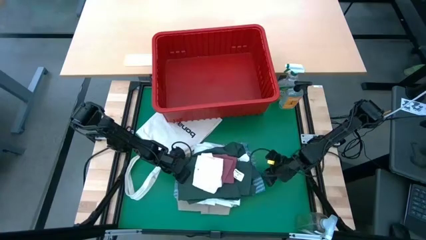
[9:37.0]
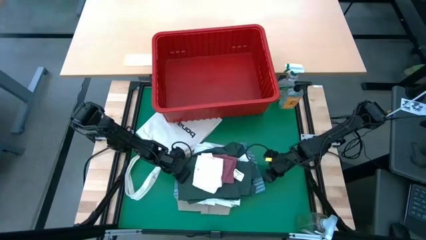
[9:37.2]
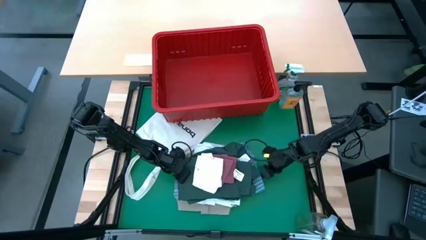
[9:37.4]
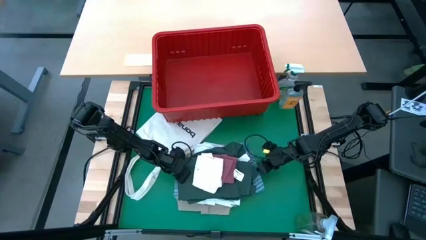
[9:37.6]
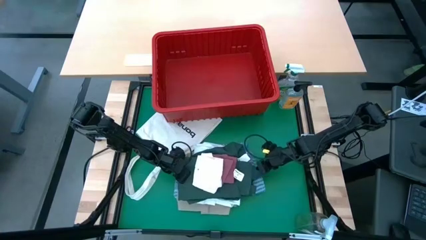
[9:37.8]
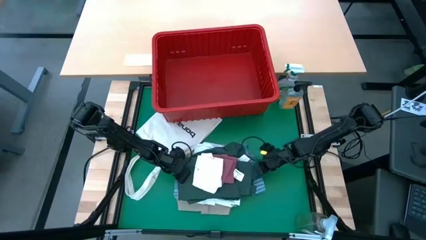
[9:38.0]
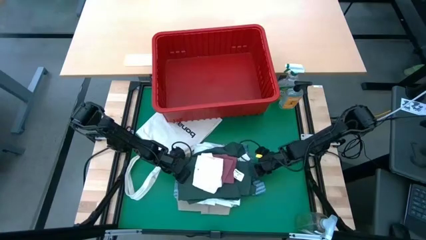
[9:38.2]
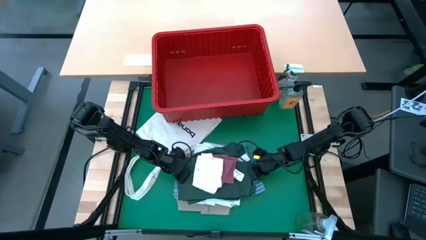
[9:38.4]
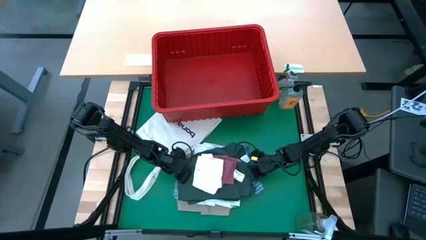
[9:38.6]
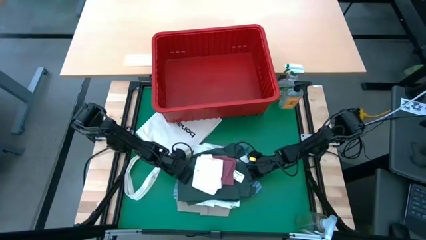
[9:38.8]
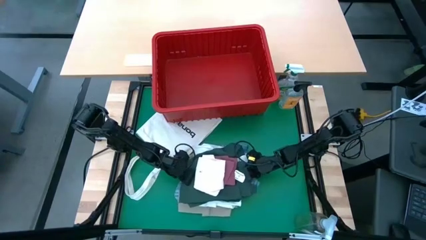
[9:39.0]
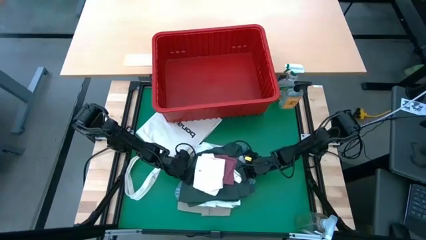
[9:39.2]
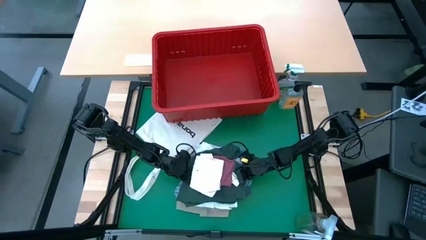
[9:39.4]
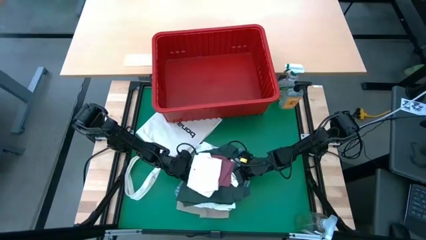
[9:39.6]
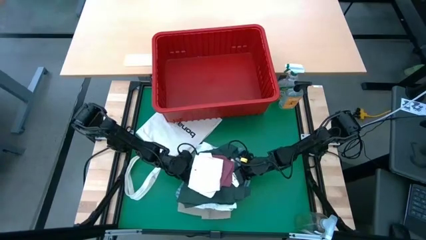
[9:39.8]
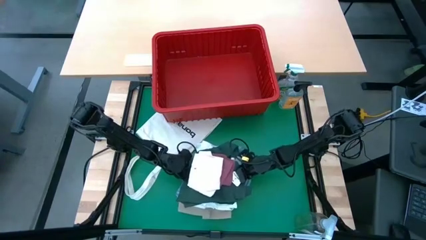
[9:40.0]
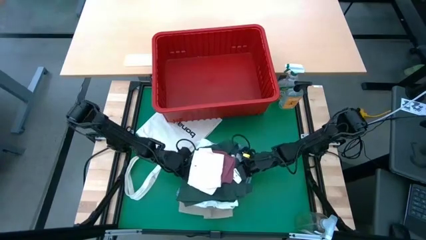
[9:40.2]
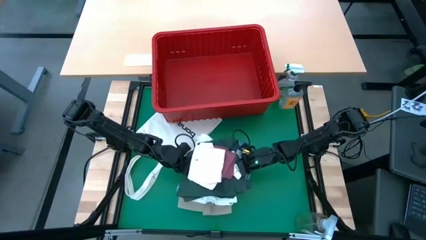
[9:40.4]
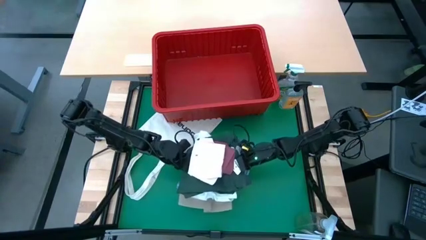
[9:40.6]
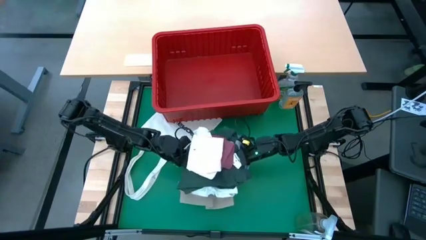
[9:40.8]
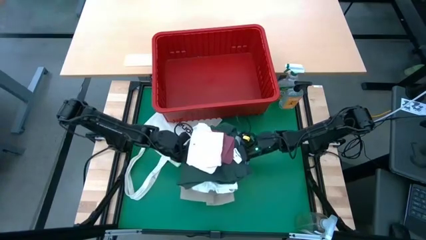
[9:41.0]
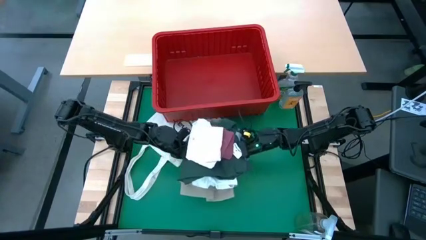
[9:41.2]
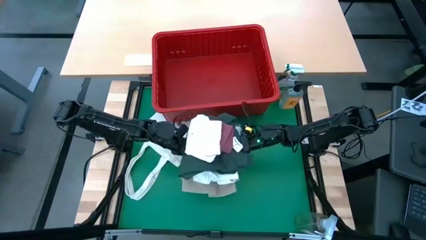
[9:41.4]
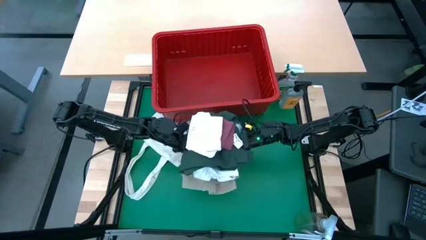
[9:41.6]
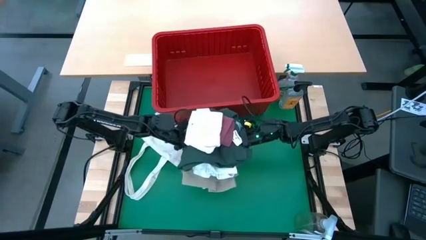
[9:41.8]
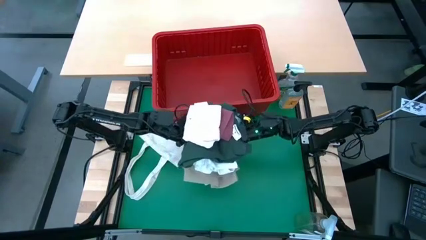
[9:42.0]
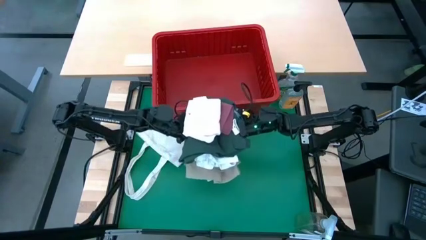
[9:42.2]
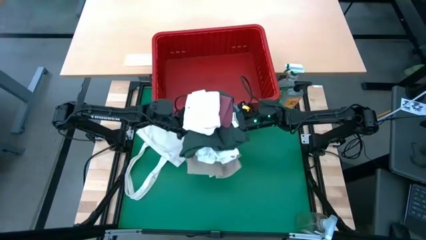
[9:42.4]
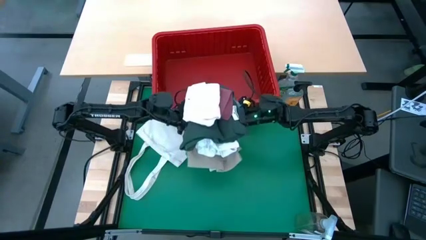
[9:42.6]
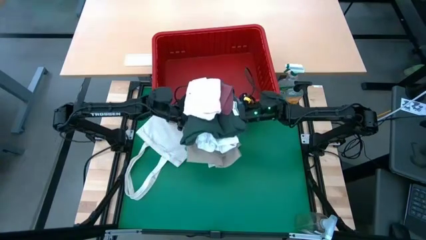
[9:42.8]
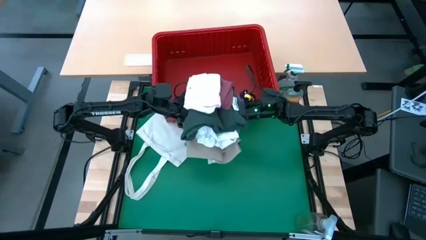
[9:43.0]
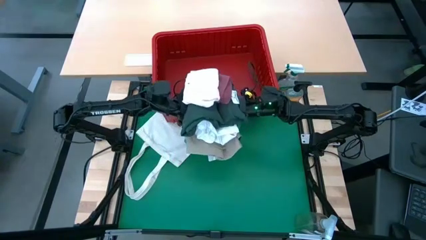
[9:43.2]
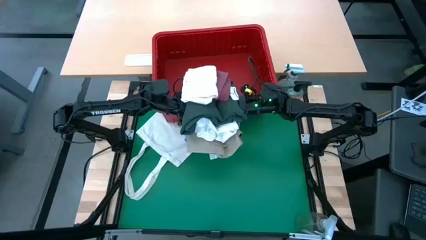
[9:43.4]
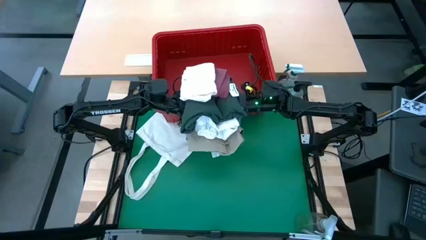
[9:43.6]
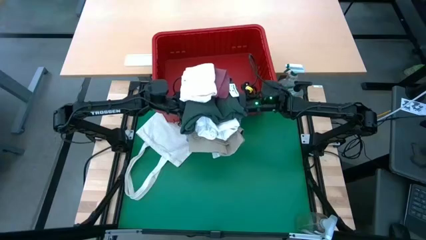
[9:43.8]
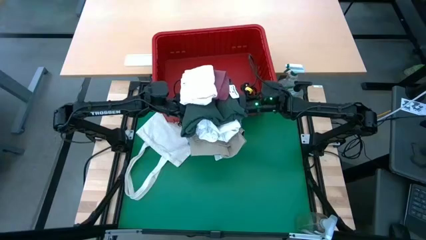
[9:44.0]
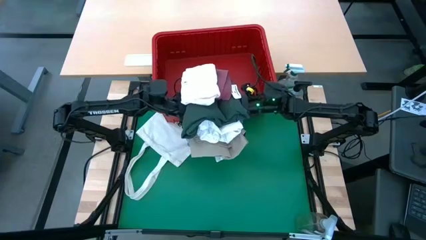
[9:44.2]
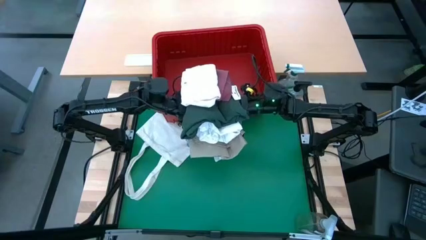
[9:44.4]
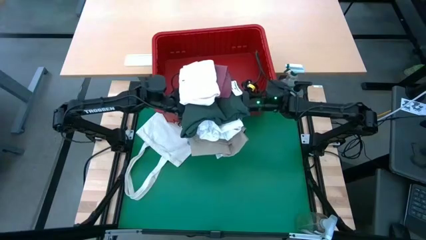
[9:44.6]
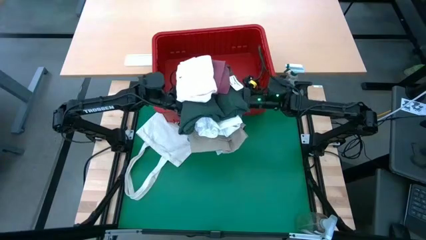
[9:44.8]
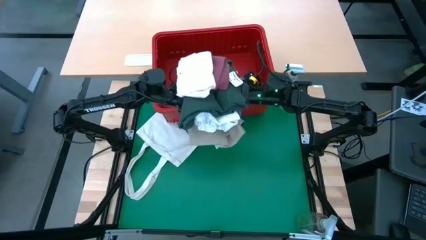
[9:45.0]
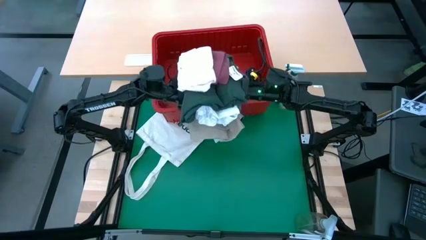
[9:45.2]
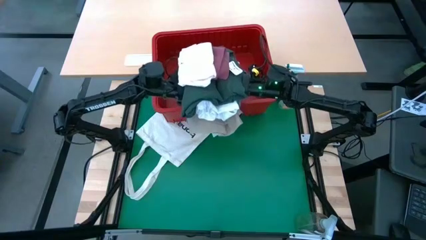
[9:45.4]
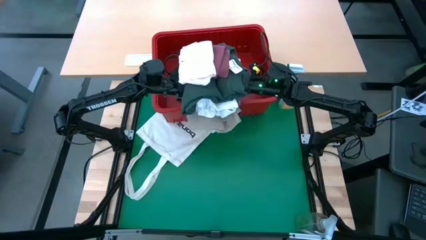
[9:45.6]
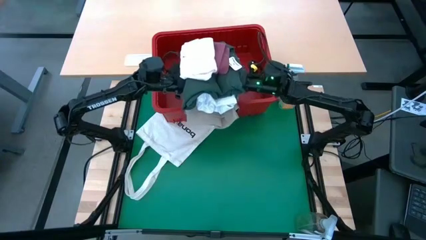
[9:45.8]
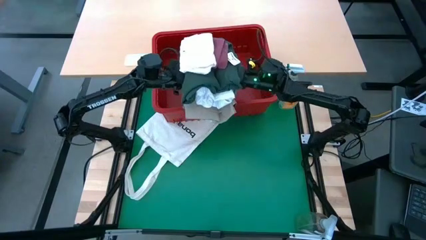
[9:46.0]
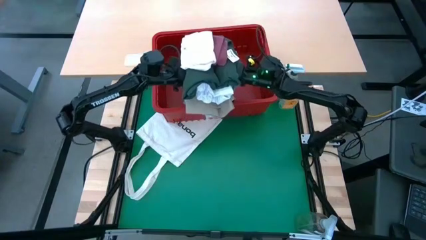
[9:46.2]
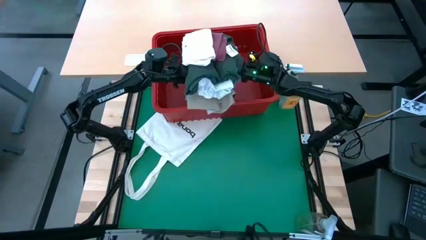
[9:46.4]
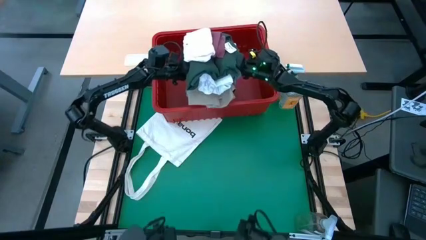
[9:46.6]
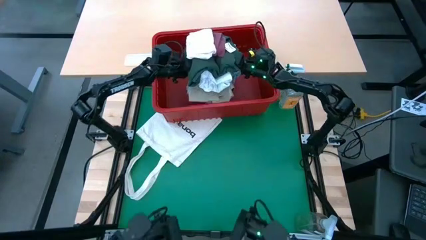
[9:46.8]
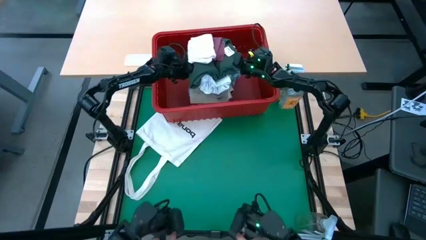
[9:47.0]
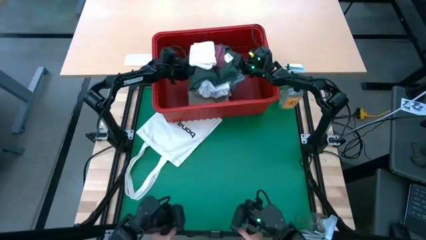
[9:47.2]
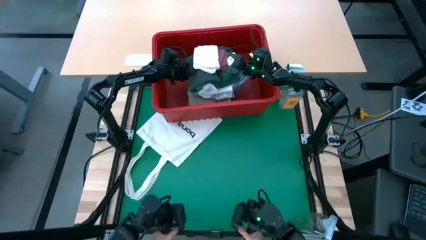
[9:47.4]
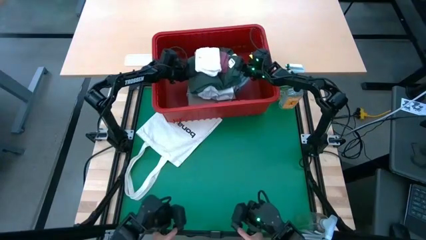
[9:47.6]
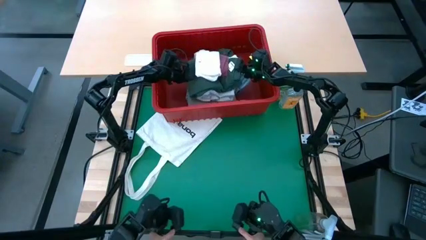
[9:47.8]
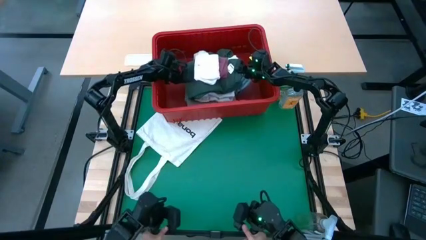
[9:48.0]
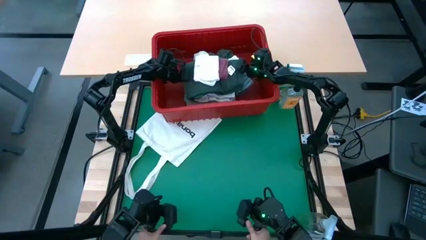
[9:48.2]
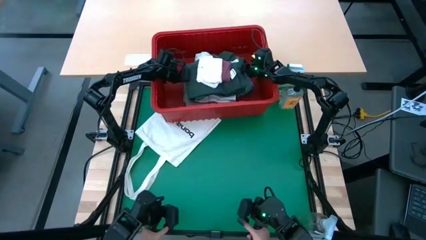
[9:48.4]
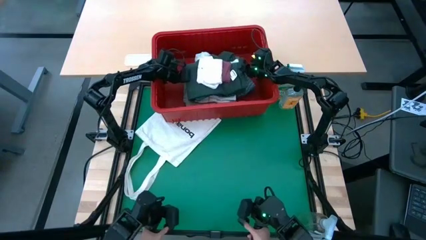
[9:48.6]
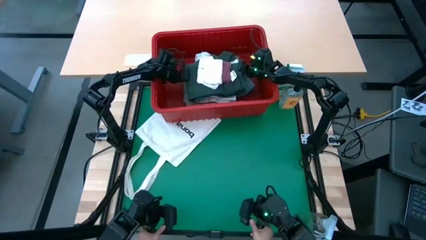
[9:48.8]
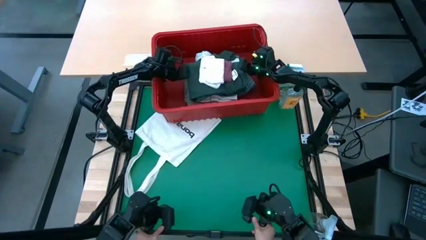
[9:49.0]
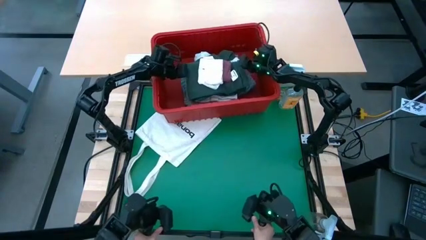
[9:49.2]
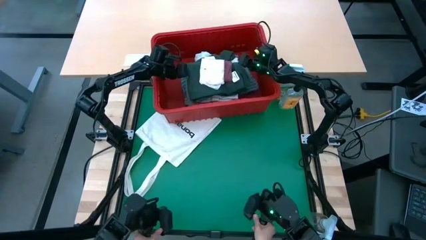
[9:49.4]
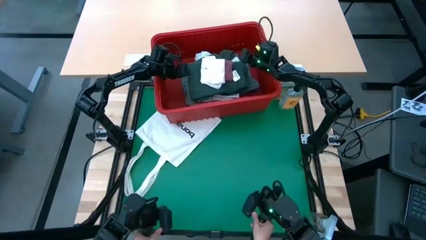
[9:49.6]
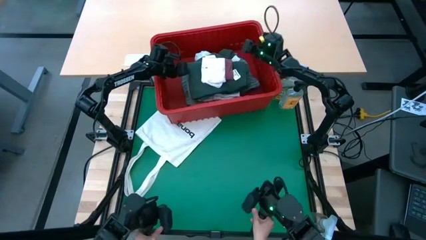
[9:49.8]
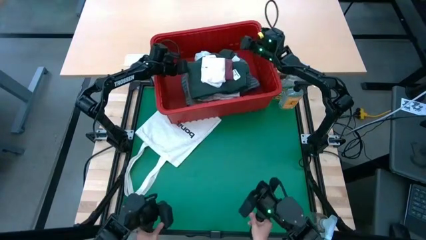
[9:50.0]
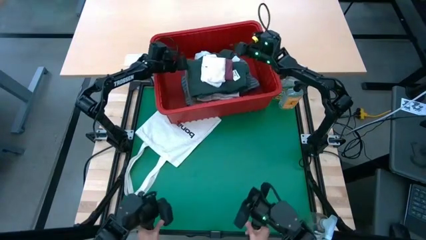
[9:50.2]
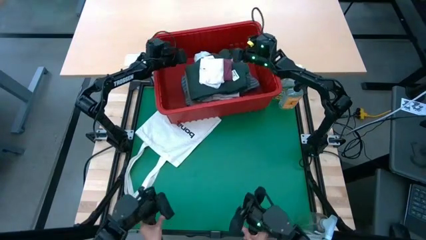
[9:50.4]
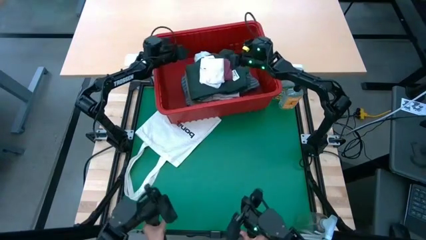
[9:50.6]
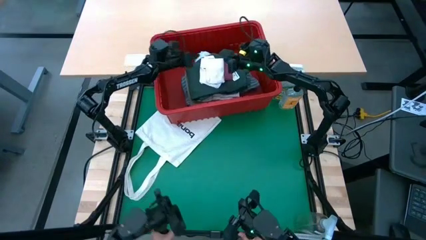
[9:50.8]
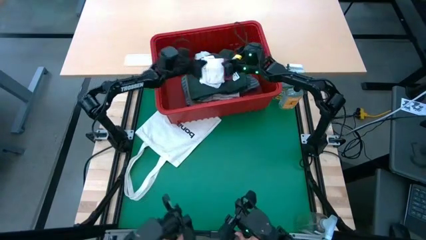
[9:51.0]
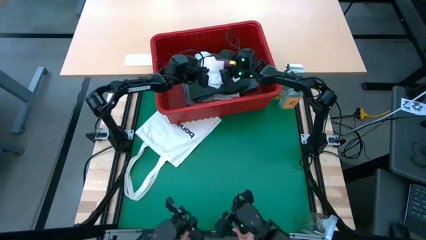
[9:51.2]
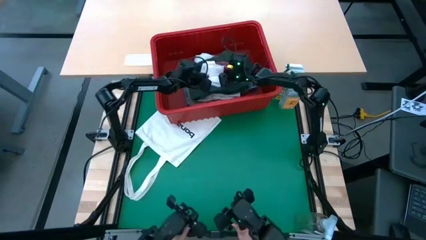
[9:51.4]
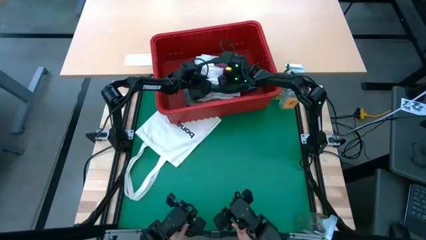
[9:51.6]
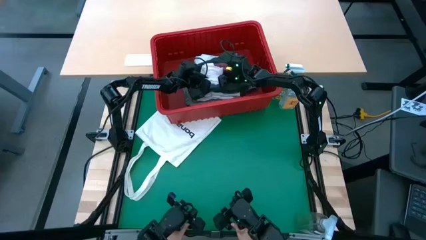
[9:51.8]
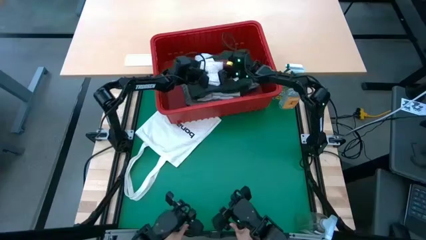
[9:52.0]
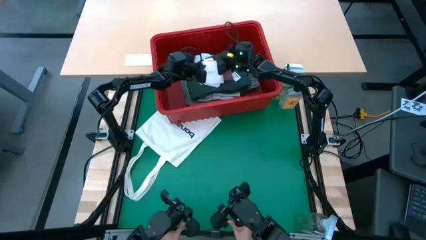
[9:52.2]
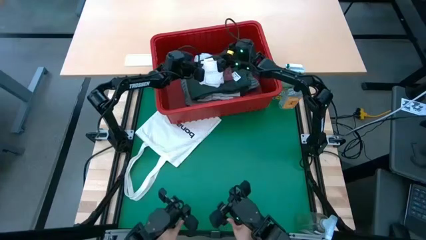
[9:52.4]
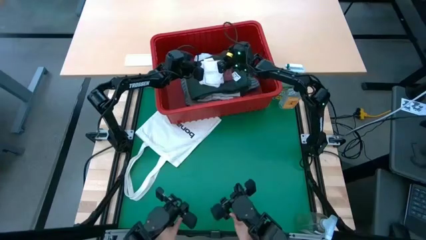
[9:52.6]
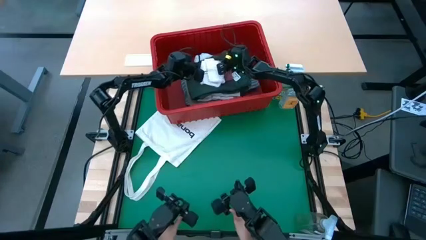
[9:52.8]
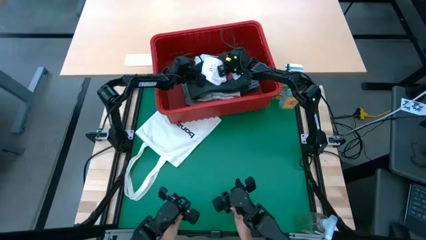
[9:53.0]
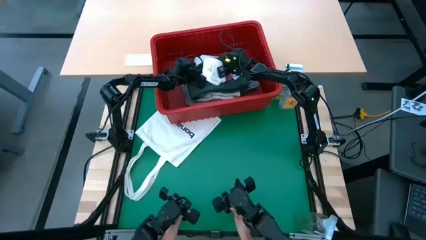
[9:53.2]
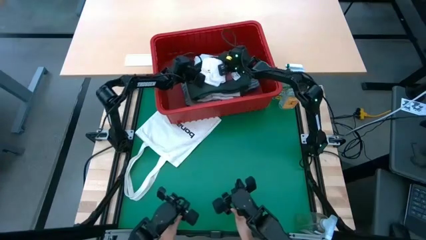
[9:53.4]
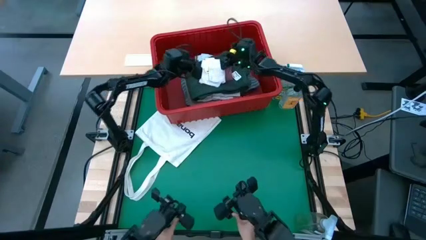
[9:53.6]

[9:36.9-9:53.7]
Task: Fold Laundry from Bin
Put the folded clothes into the red bin
